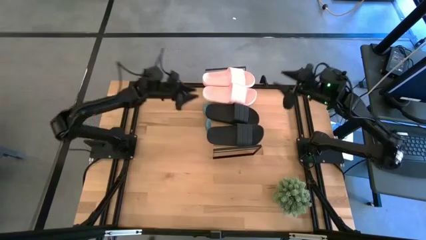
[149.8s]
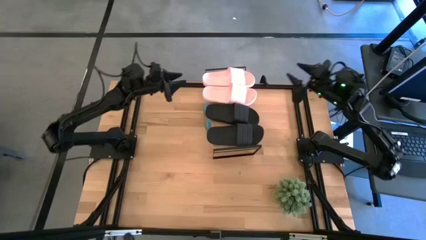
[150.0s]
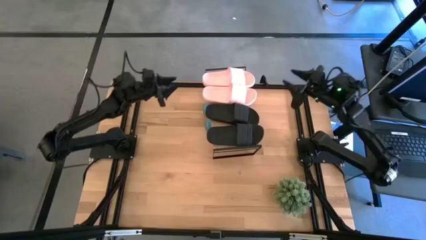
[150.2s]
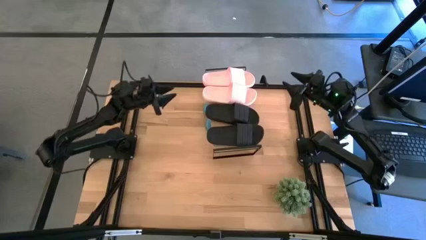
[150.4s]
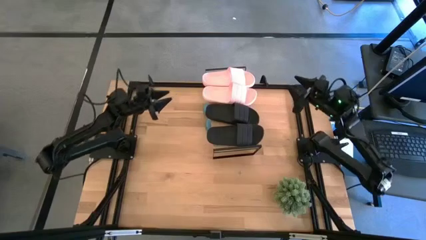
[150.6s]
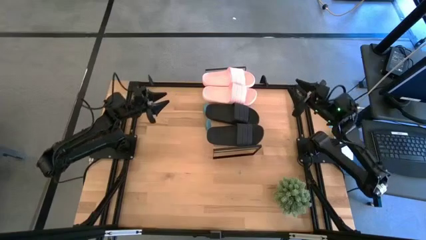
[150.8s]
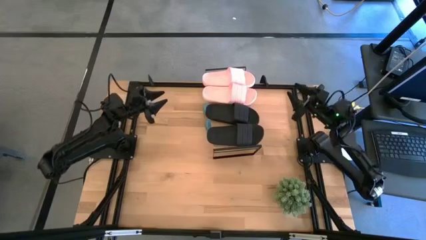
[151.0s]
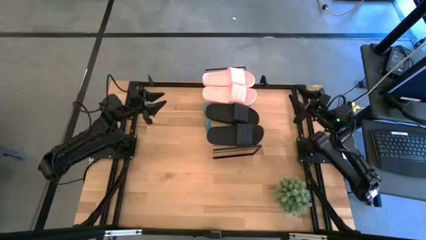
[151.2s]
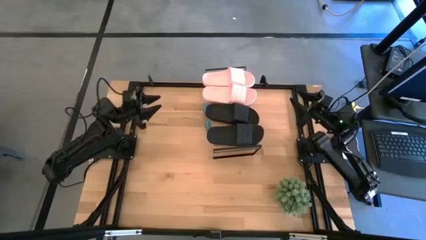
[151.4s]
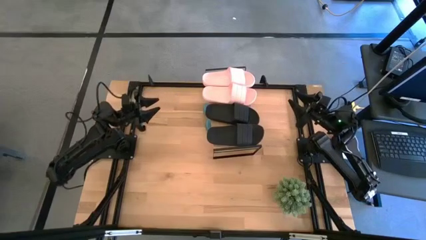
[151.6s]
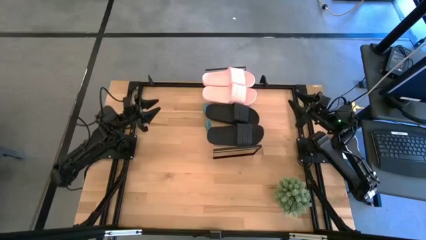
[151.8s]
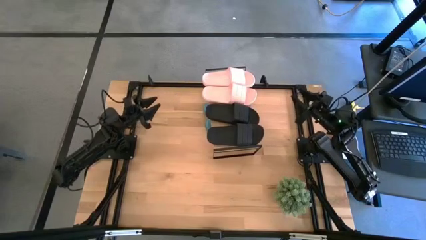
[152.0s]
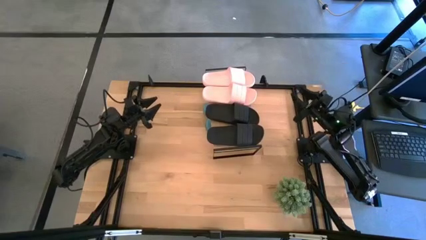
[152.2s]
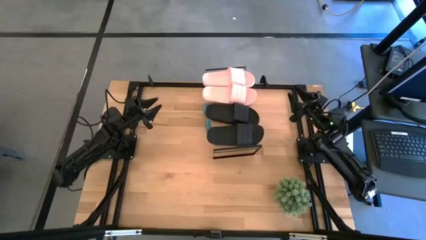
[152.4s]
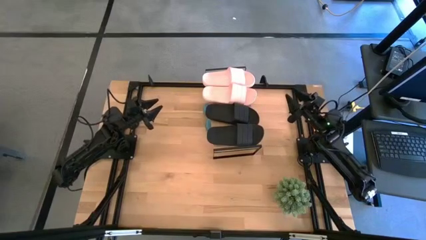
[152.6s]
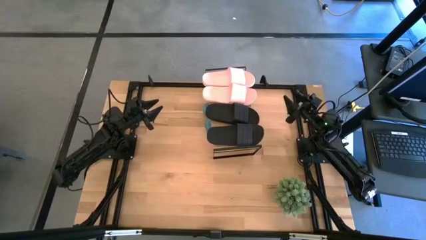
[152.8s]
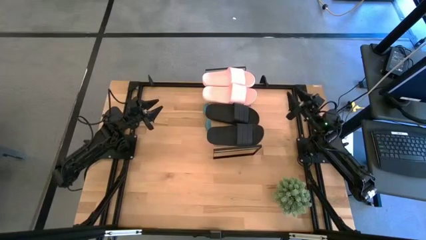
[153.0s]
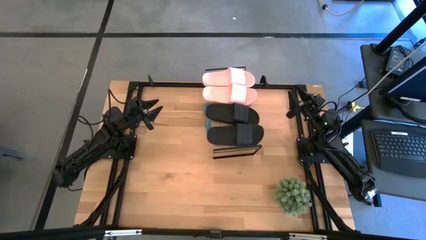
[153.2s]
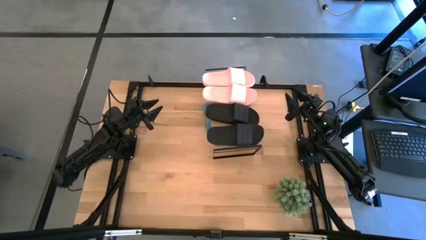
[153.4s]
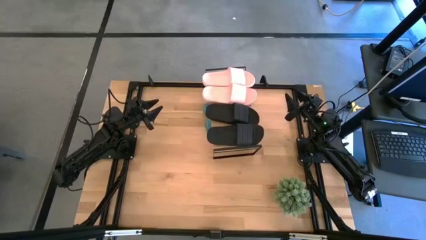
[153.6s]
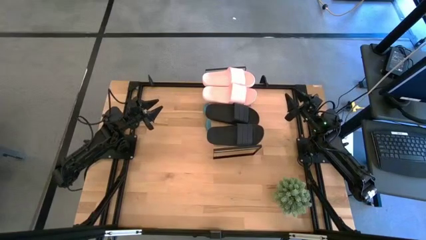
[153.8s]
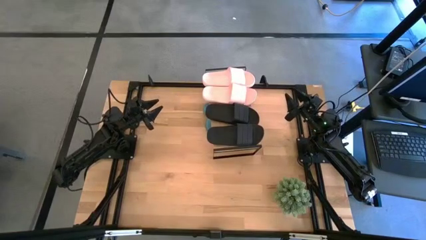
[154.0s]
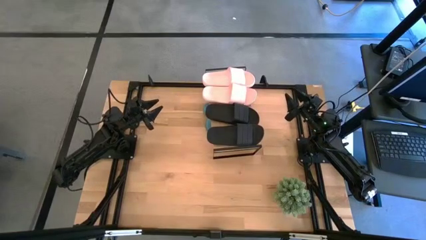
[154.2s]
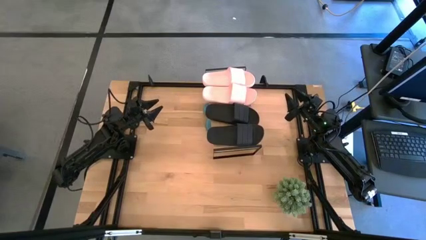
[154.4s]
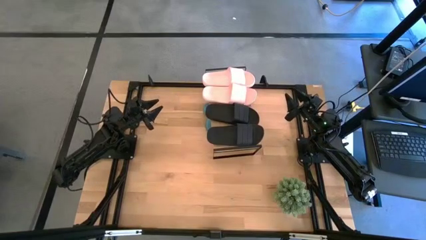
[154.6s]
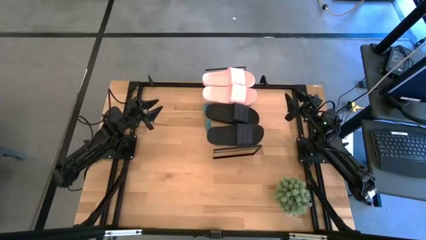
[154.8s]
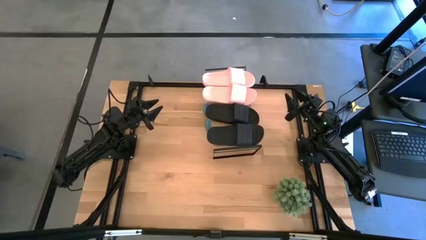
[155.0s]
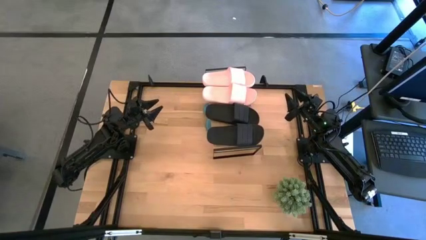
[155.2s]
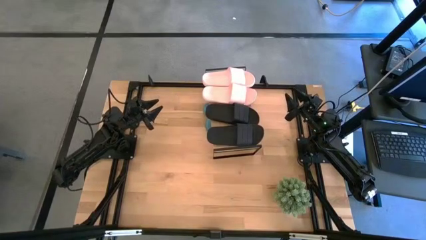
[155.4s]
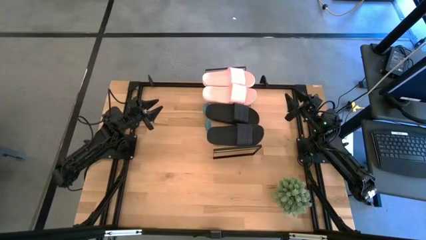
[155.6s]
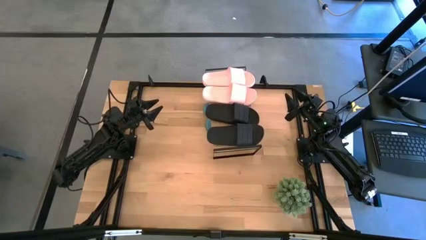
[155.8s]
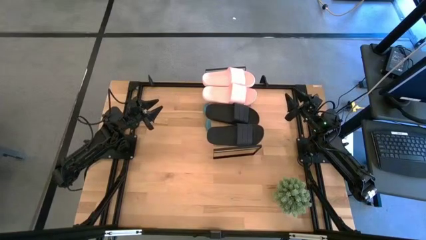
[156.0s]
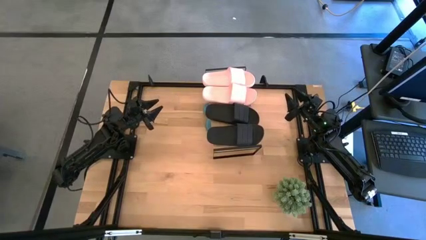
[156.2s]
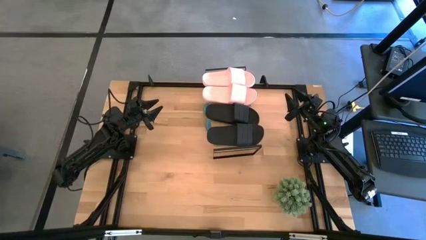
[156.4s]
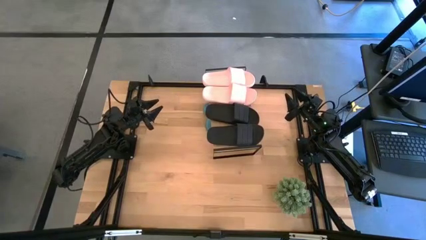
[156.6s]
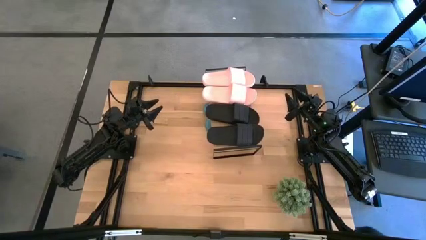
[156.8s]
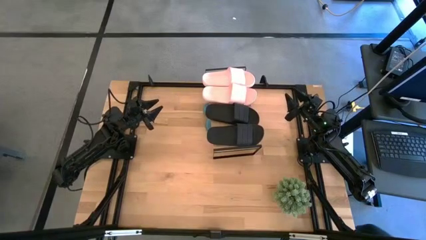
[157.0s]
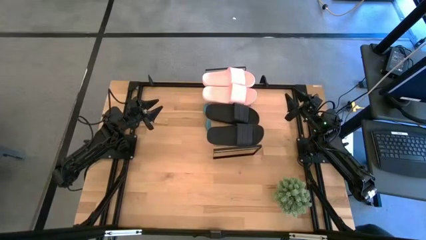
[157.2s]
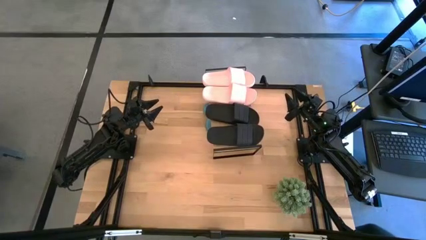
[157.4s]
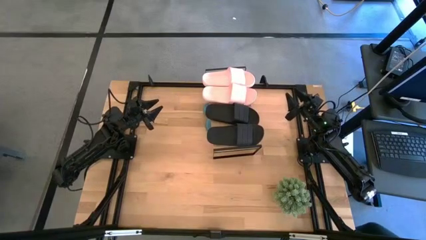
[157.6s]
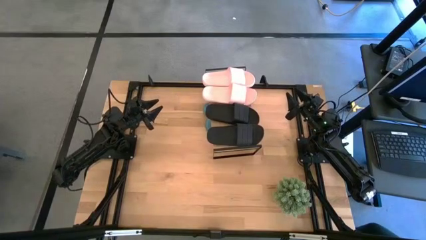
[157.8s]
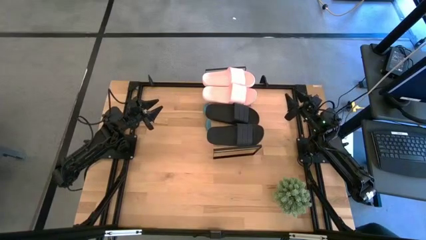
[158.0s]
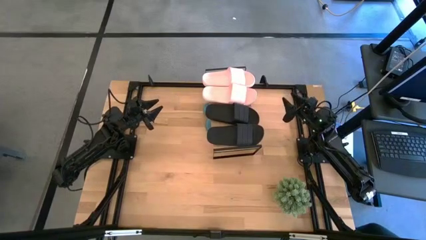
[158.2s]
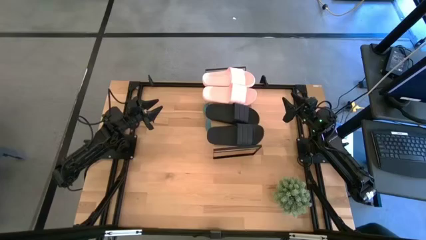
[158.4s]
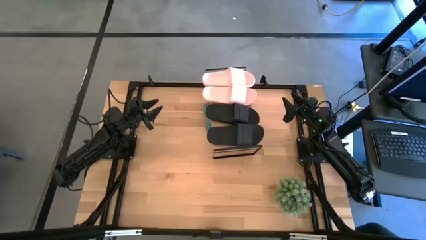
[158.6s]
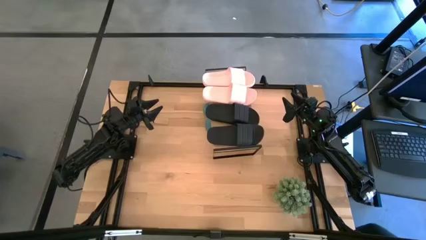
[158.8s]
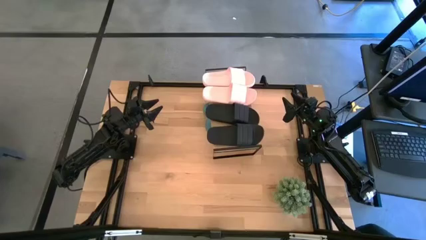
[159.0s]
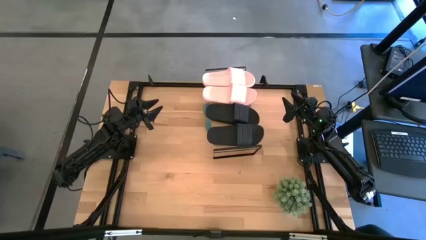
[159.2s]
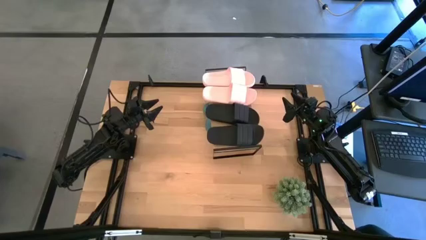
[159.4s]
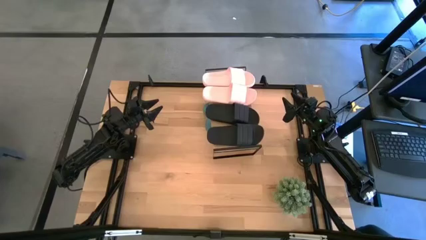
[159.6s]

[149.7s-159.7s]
Task: Pick and place slides into the shelf
Return to Home Position

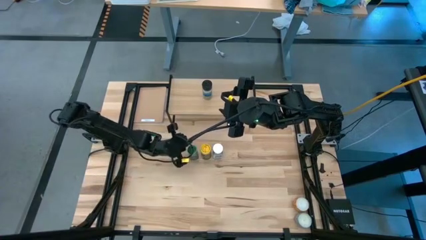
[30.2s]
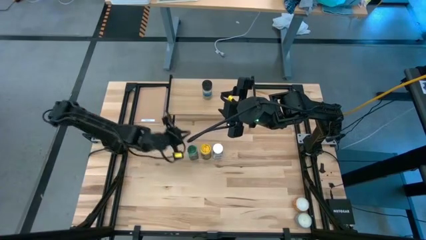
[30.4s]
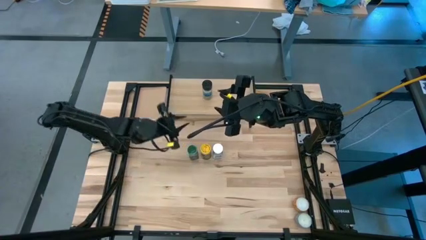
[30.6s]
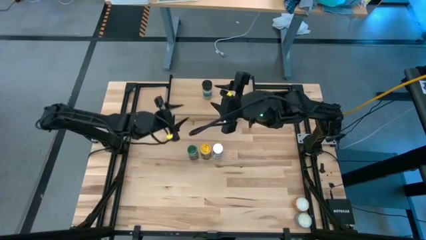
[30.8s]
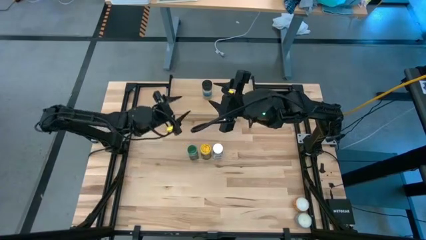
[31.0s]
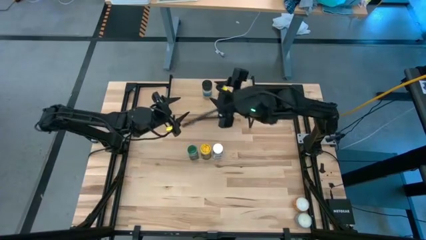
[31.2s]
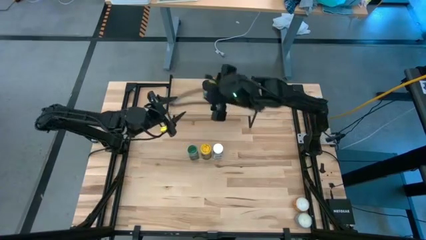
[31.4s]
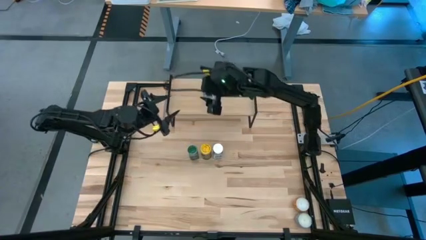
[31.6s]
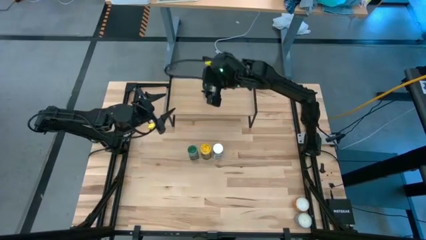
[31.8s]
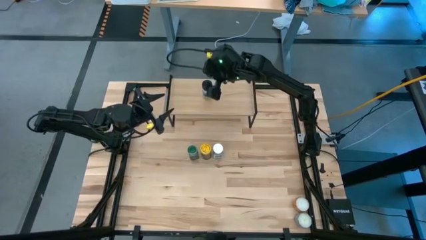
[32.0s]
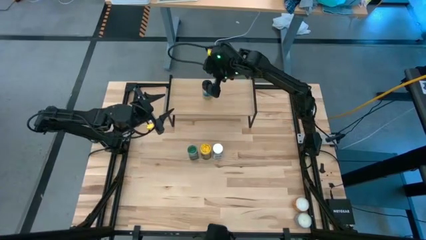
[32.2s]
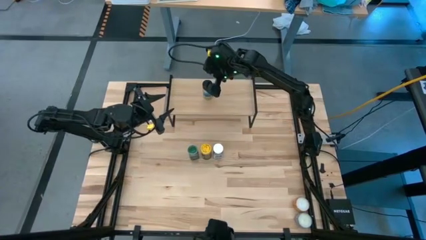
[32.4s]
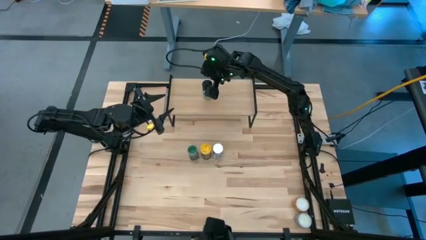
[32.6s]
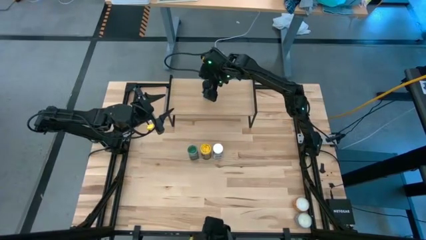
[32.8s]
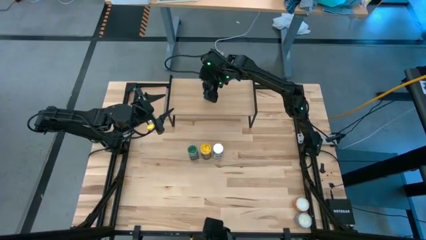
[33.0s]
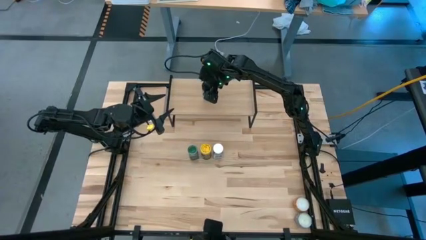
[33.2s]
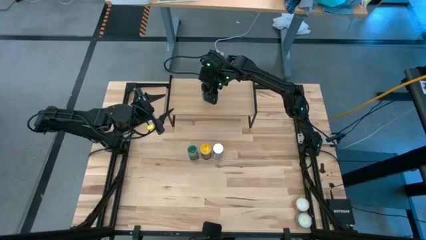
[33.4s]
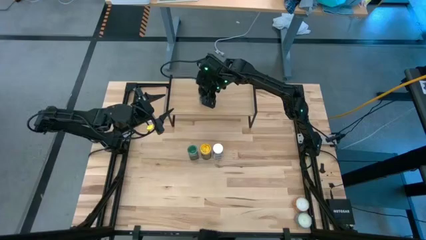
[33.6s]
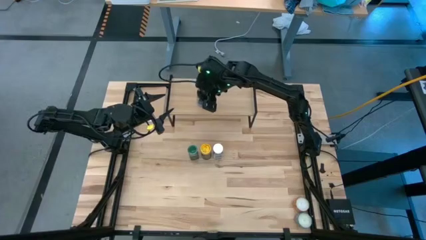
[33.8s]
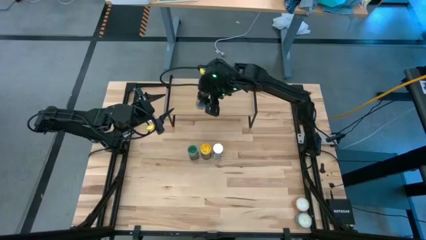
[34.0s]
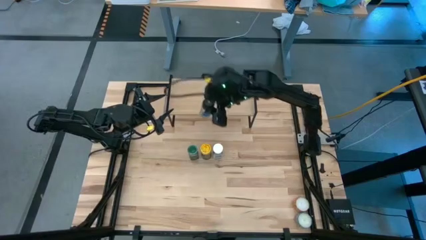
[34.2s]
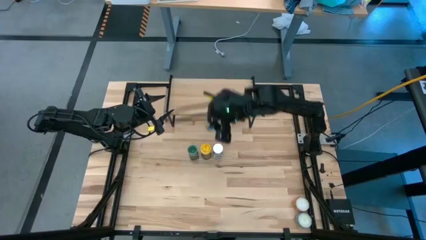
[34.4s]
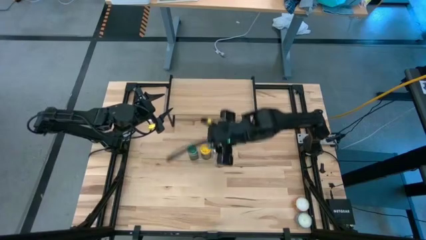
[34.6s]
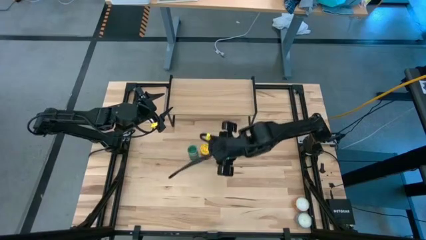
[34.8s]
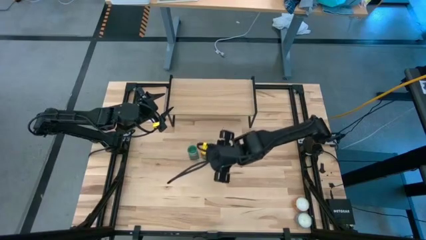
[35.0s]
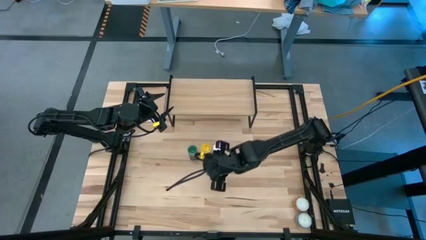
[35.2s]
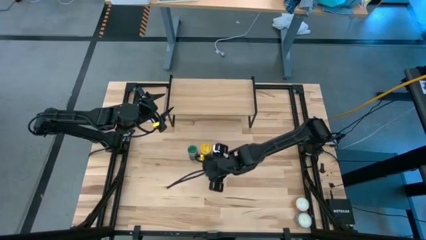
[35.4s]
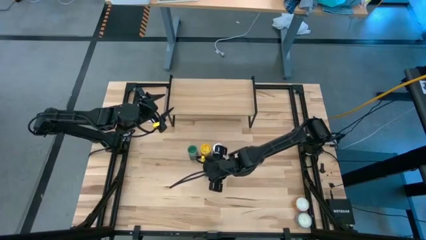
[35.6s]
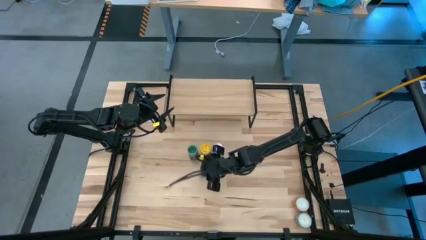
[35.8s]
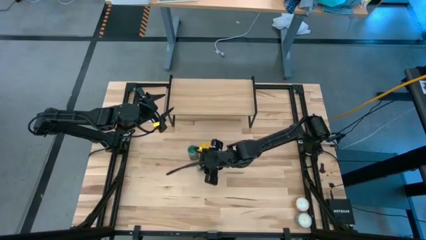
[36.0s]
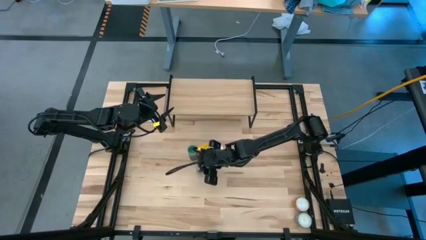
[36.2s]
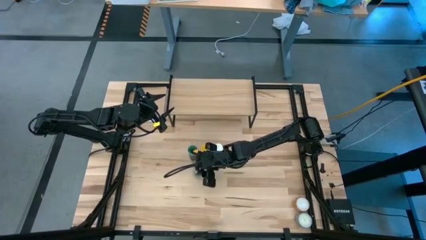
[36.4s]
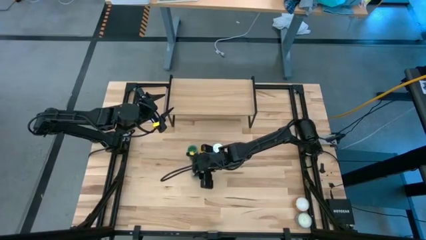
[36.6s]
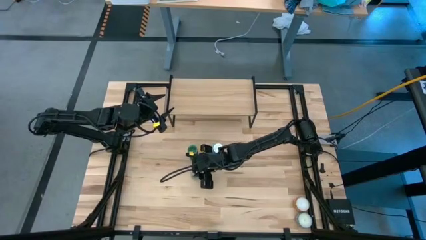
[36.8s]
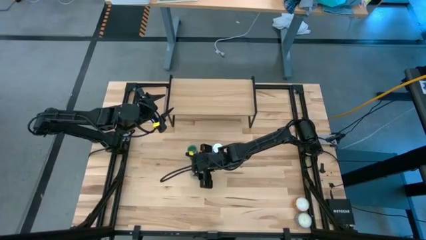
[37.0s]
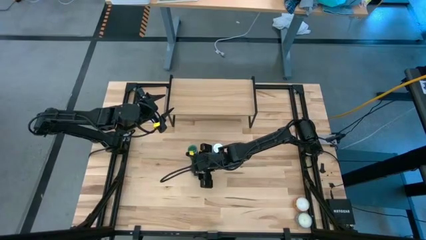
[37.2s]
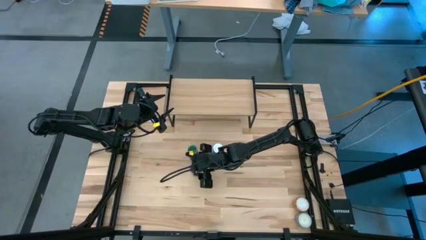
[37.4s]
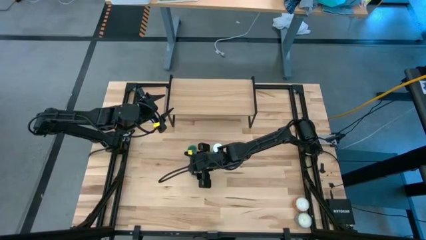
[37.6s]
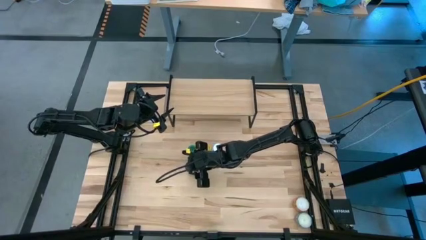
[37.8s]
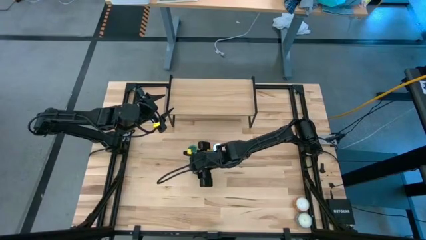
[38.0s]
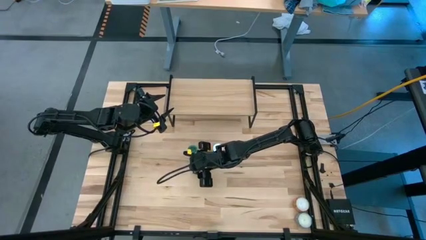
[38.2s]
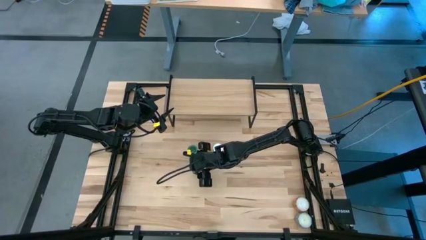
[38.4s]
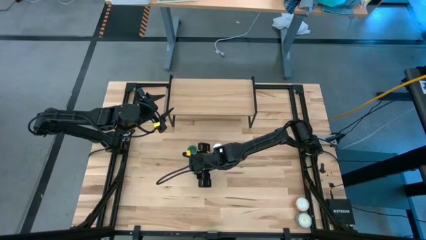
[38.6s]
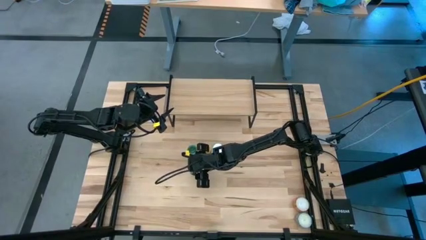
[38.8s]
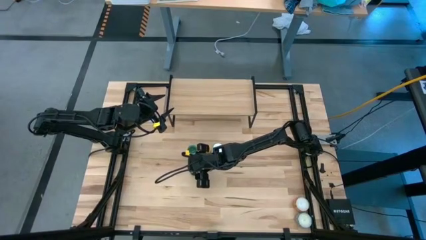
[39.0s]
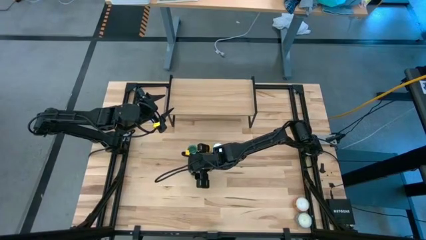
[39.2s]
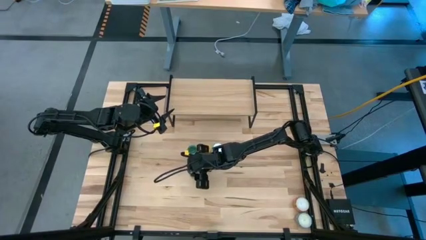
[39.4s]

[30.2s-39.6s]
Task: Shelf spices
Remove the black seasoning bottle from the shelf
